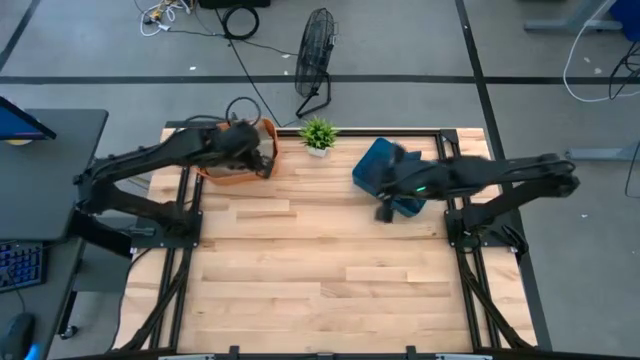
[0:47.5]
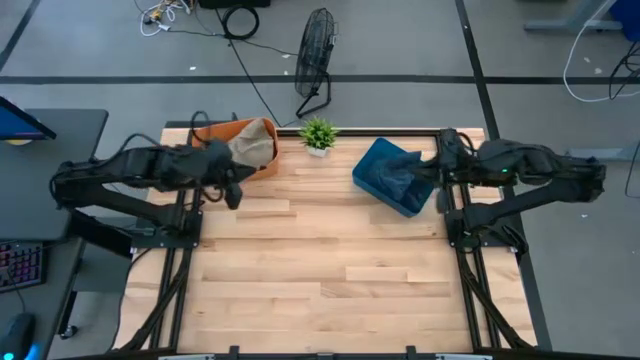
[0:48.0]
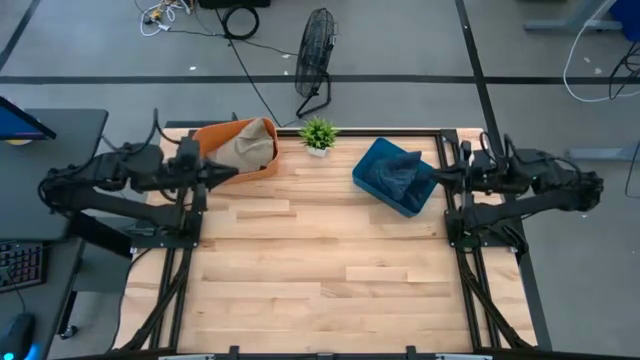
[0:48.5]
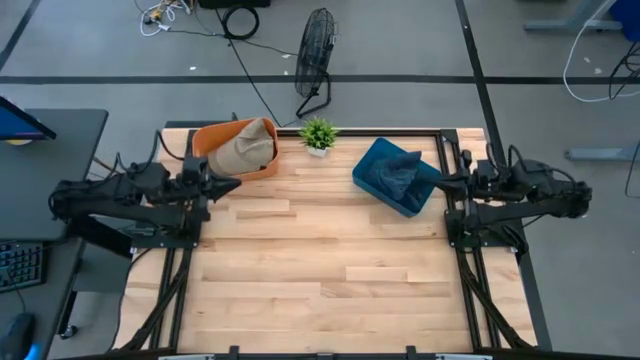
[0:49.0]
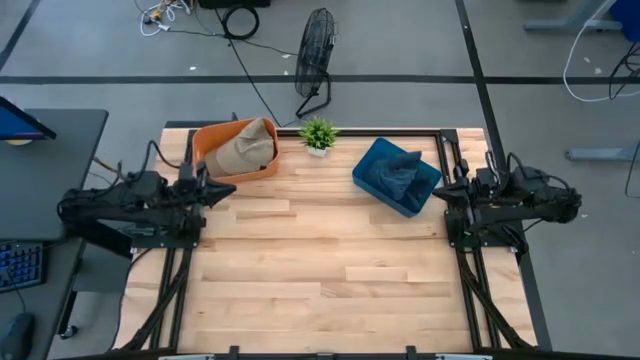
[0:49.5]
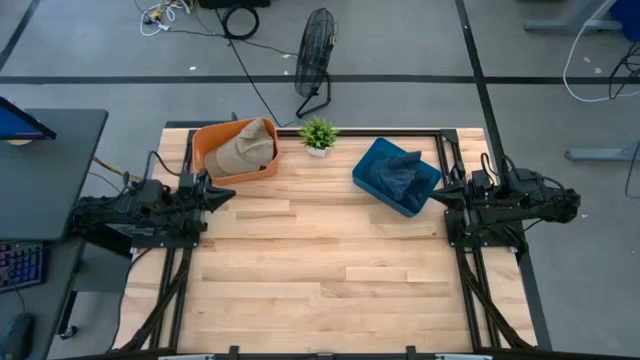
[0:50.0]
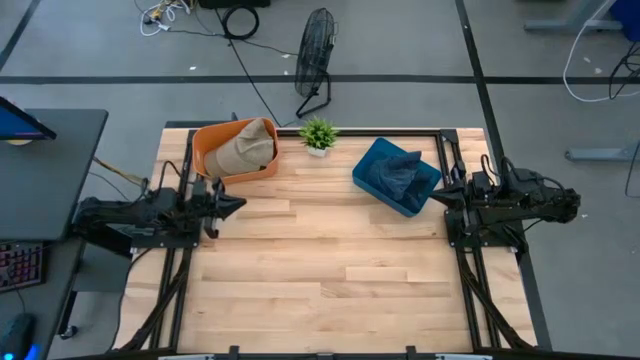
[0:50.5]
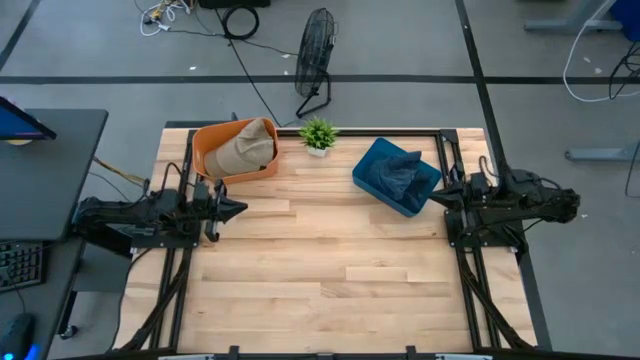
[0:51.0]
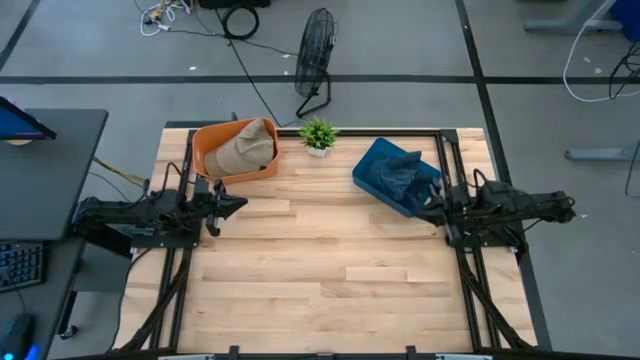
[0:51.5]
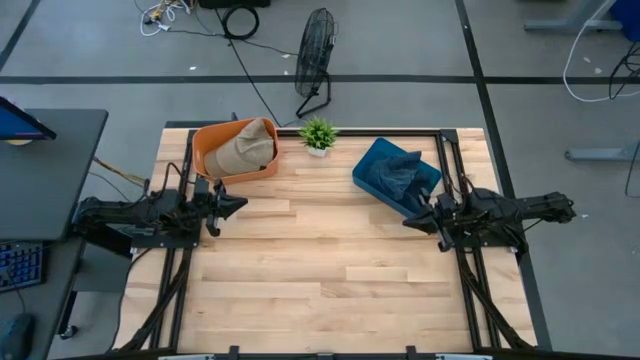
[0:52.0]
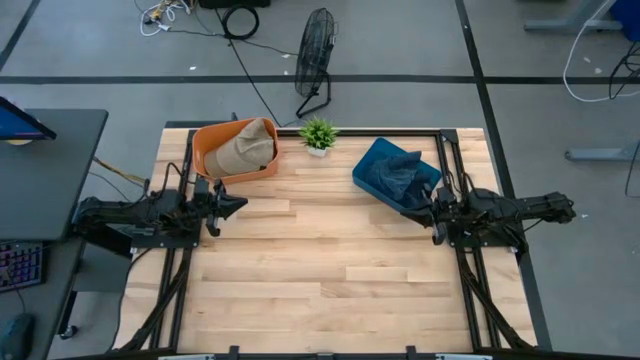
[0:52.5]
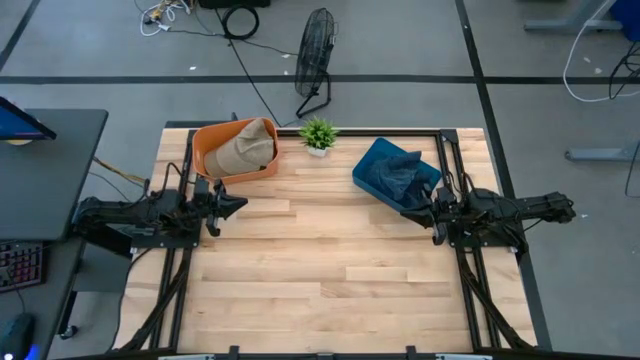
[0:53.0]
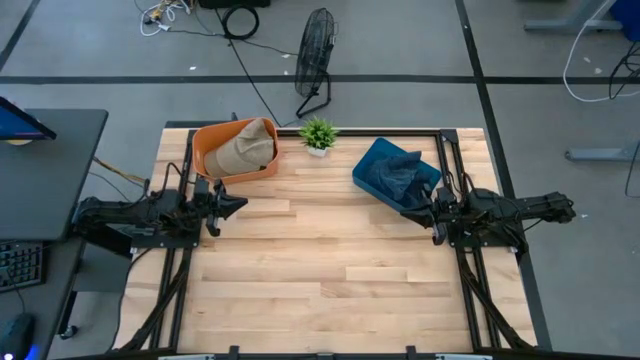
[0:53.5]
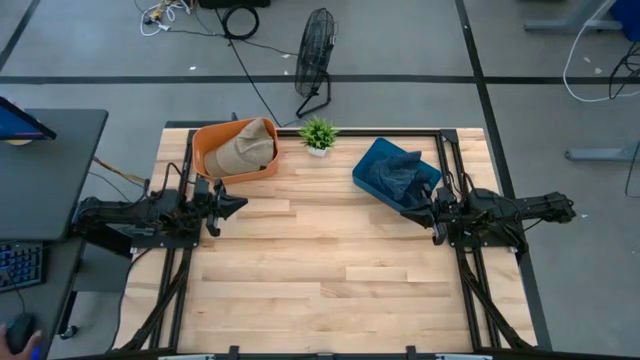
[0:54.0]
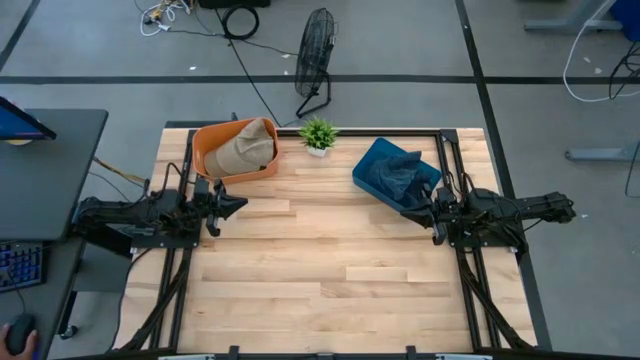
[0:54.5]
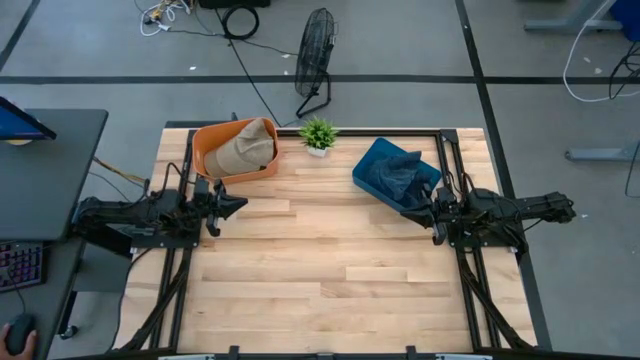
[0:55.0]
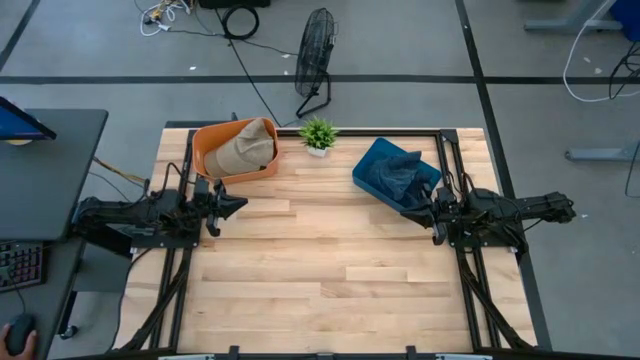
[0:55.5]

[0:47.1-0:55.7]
Task: Pick & Place hat
Return to Home Position
